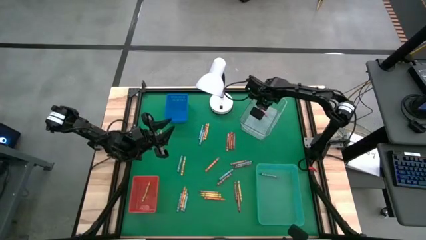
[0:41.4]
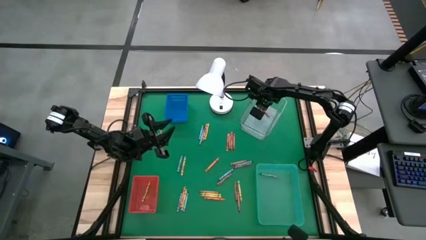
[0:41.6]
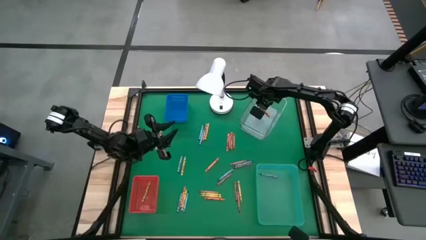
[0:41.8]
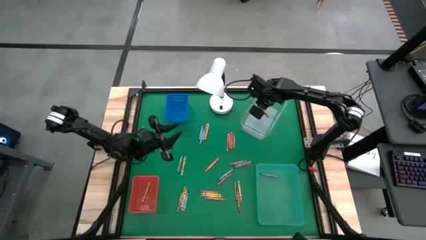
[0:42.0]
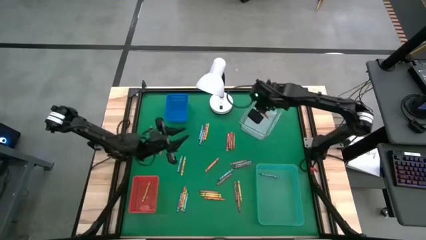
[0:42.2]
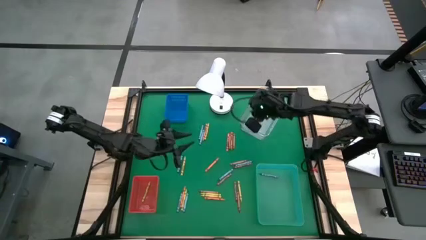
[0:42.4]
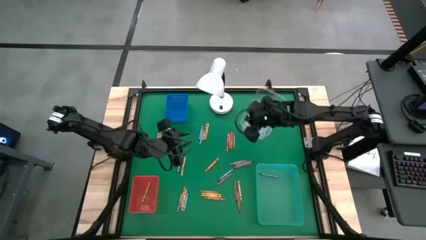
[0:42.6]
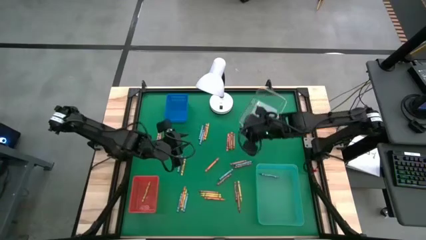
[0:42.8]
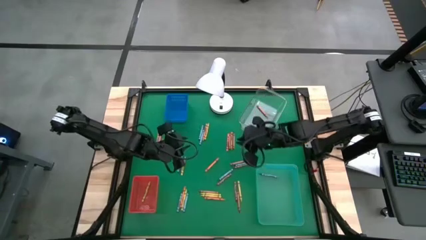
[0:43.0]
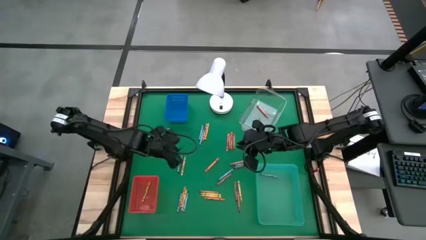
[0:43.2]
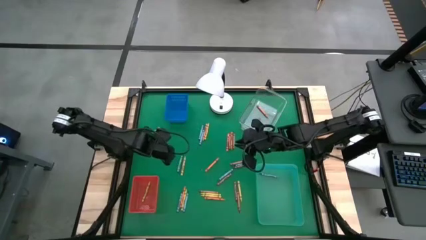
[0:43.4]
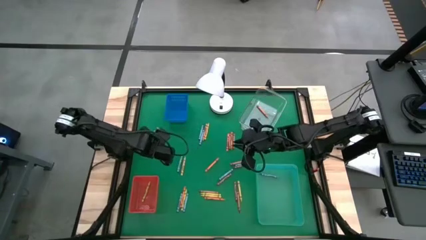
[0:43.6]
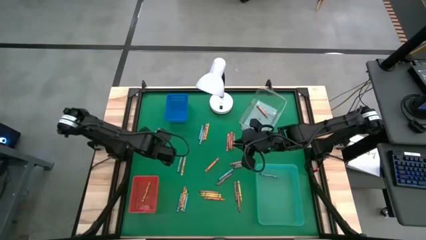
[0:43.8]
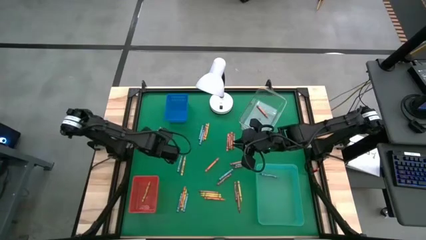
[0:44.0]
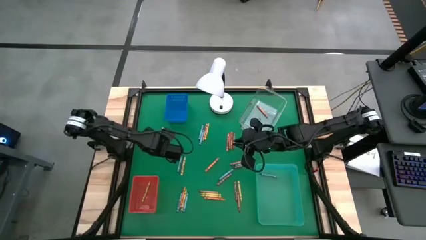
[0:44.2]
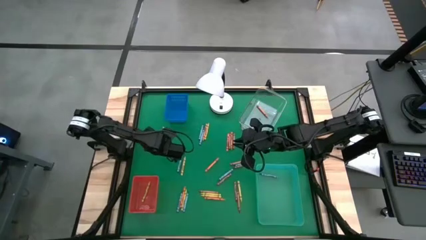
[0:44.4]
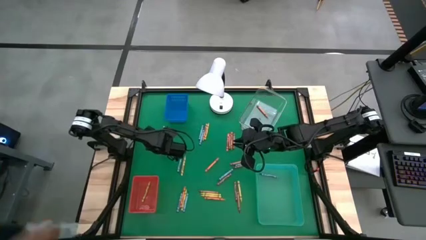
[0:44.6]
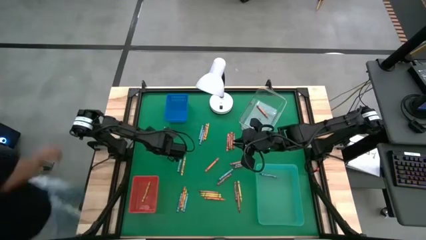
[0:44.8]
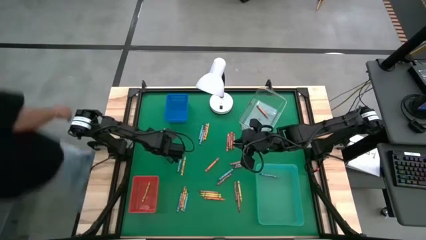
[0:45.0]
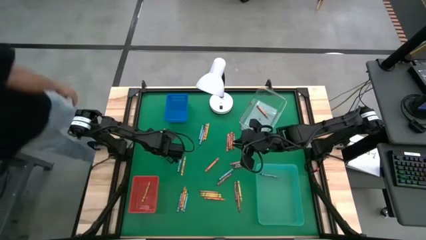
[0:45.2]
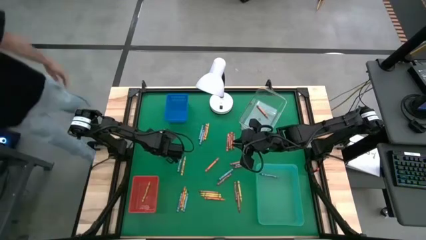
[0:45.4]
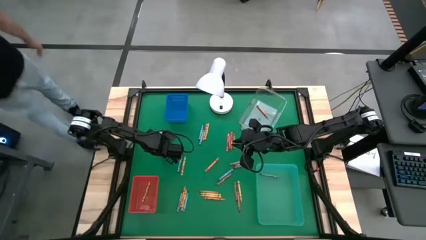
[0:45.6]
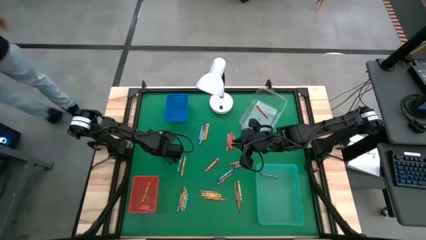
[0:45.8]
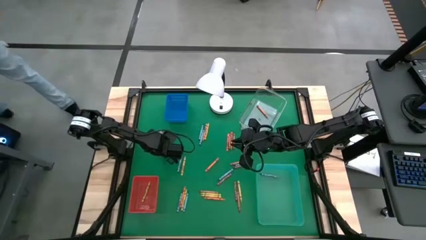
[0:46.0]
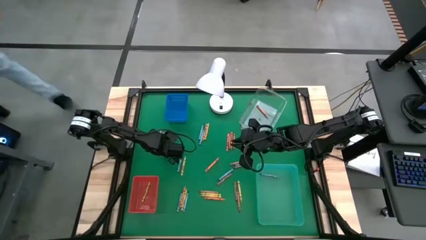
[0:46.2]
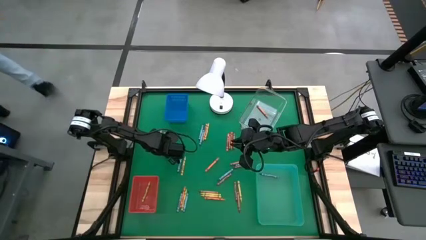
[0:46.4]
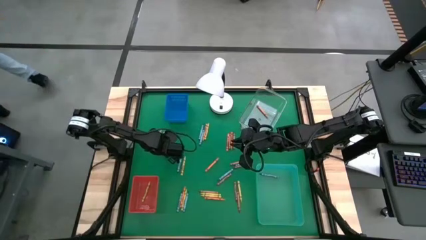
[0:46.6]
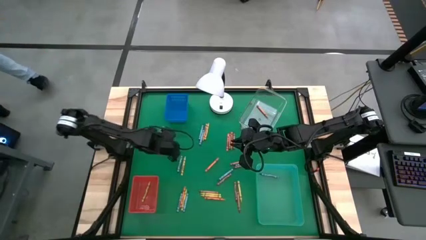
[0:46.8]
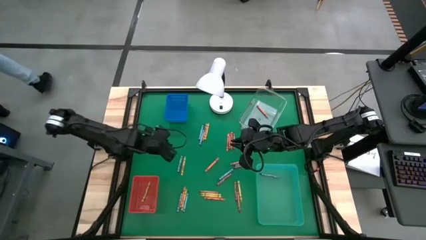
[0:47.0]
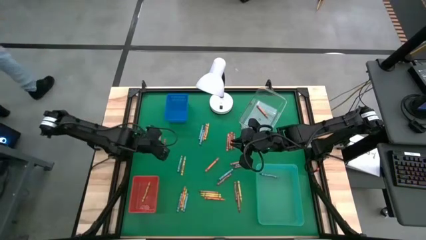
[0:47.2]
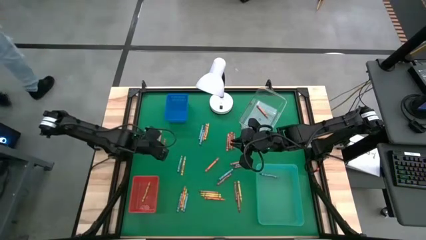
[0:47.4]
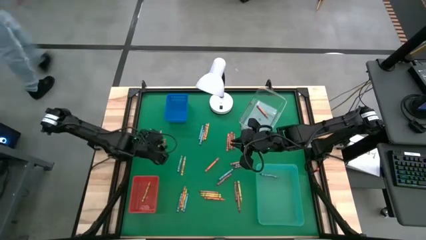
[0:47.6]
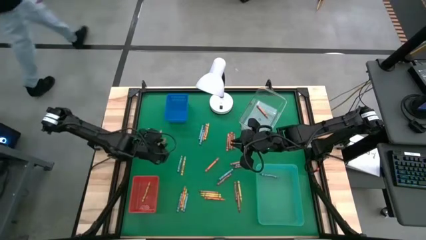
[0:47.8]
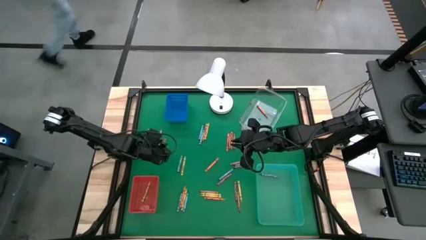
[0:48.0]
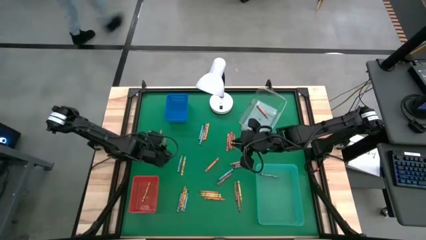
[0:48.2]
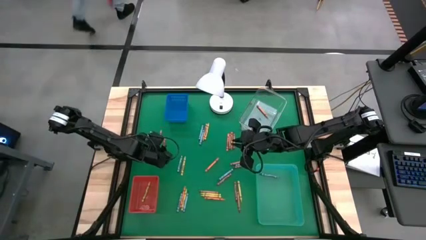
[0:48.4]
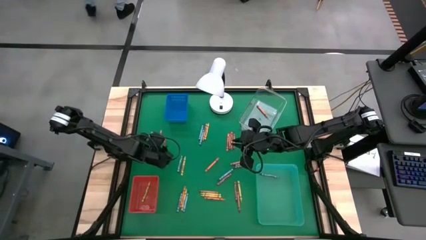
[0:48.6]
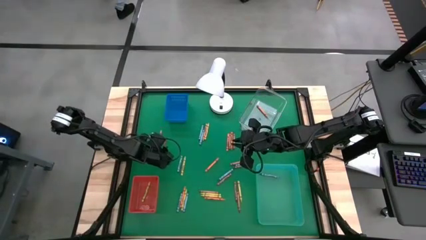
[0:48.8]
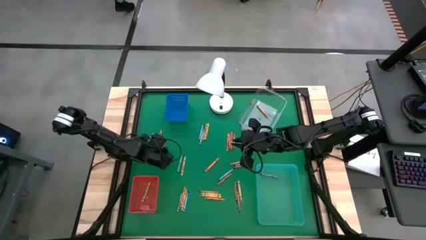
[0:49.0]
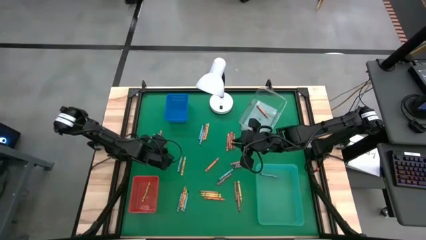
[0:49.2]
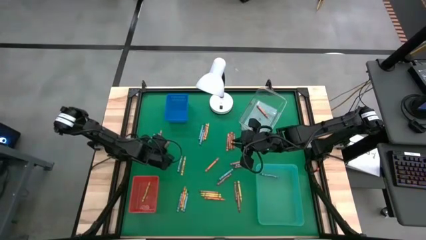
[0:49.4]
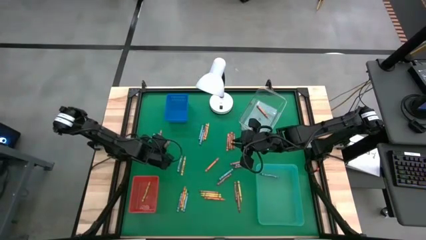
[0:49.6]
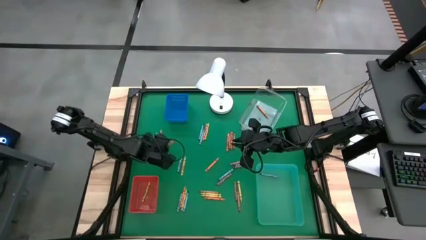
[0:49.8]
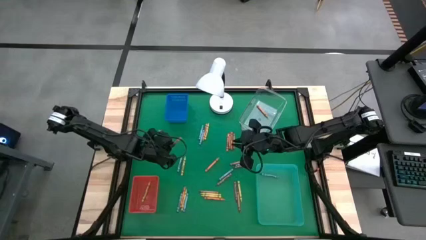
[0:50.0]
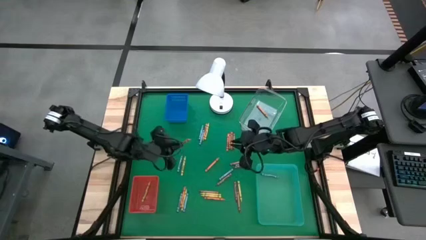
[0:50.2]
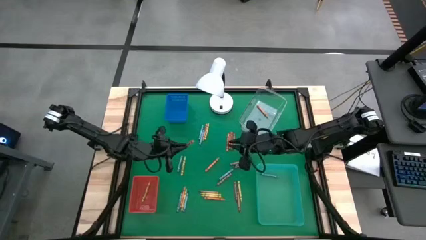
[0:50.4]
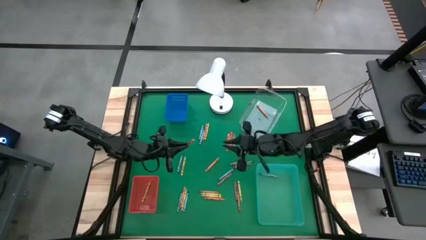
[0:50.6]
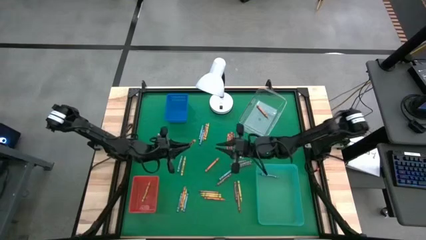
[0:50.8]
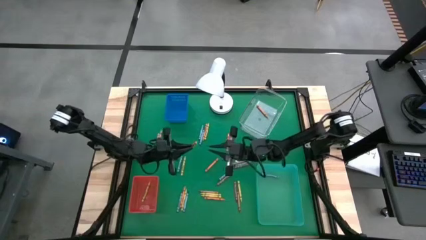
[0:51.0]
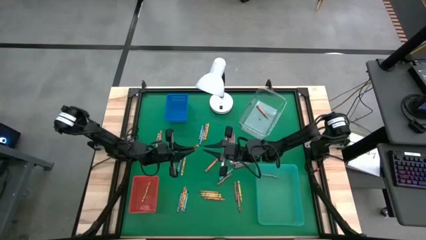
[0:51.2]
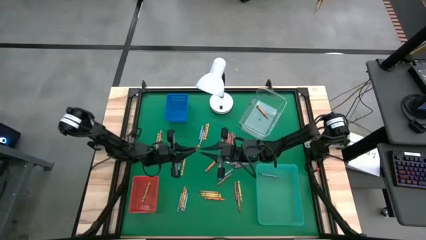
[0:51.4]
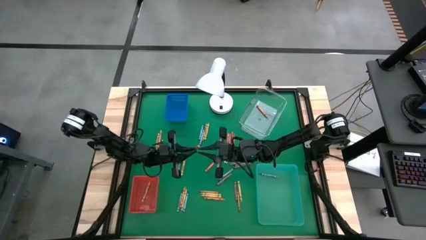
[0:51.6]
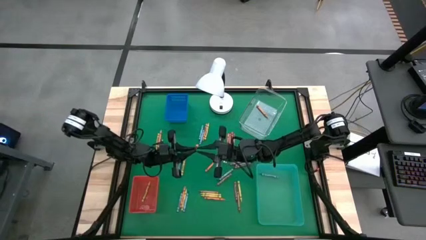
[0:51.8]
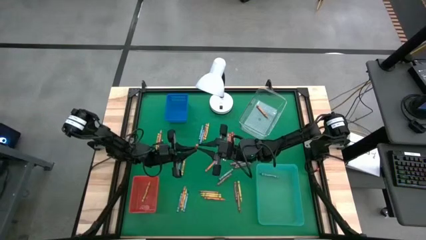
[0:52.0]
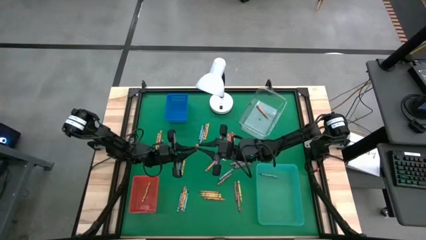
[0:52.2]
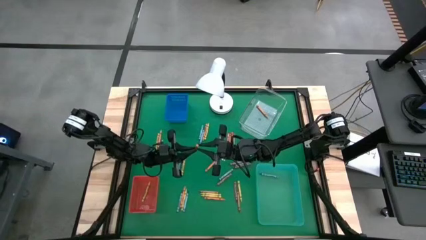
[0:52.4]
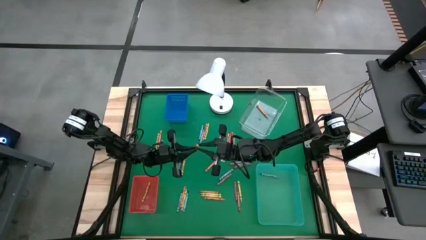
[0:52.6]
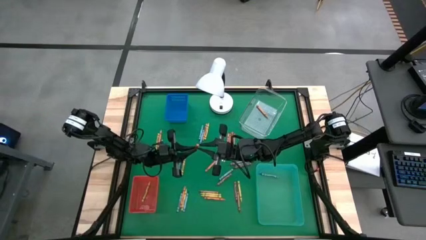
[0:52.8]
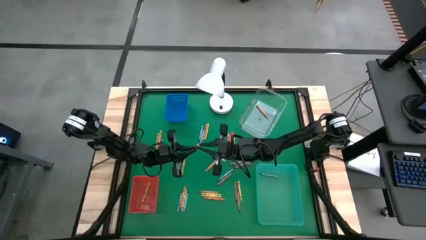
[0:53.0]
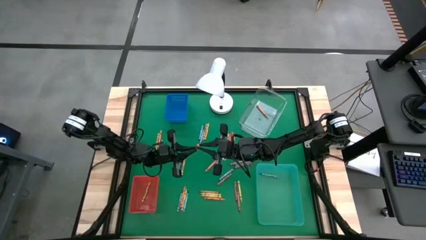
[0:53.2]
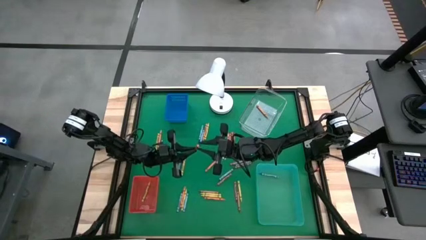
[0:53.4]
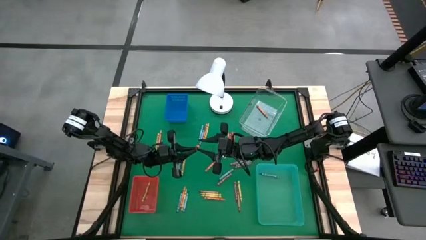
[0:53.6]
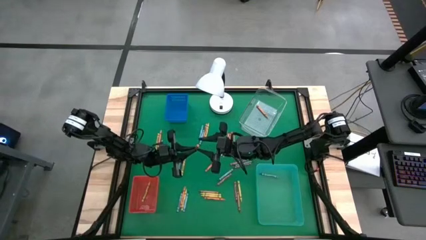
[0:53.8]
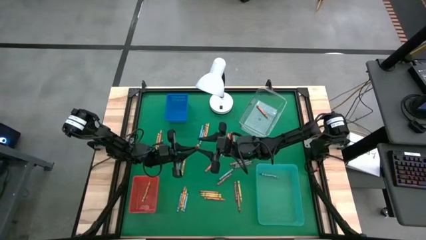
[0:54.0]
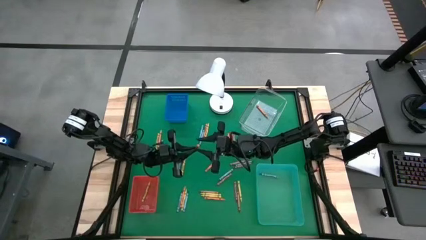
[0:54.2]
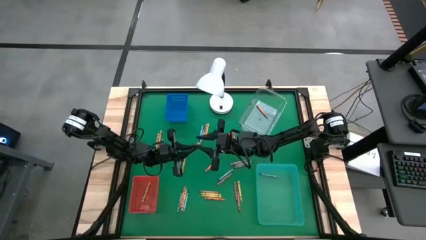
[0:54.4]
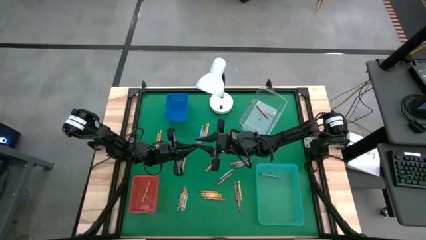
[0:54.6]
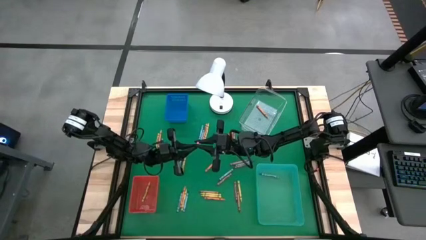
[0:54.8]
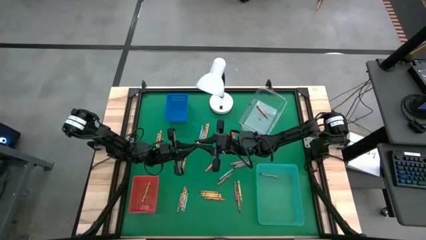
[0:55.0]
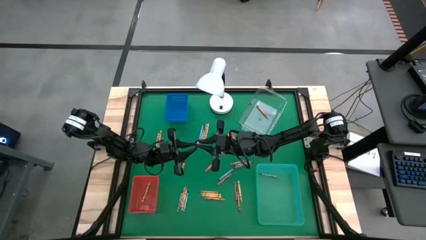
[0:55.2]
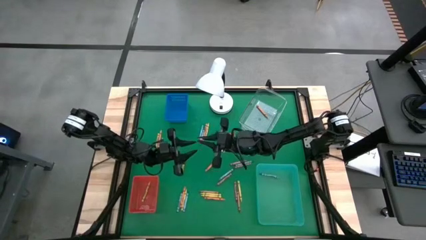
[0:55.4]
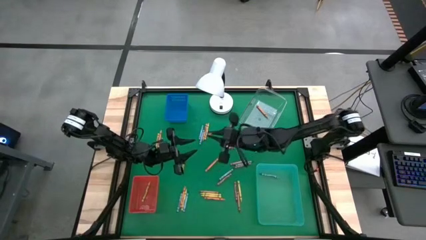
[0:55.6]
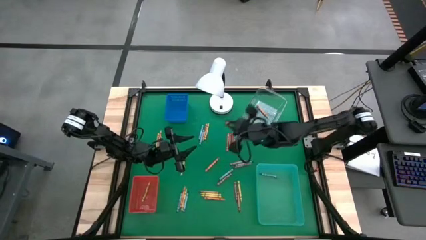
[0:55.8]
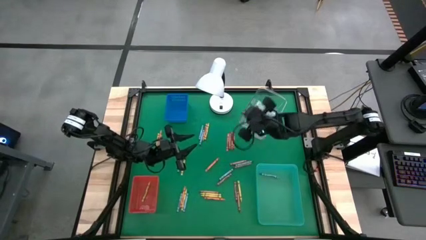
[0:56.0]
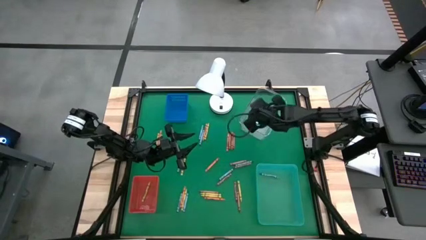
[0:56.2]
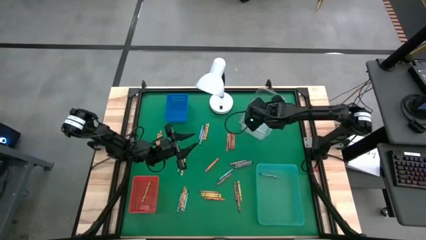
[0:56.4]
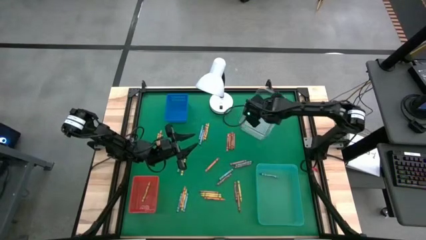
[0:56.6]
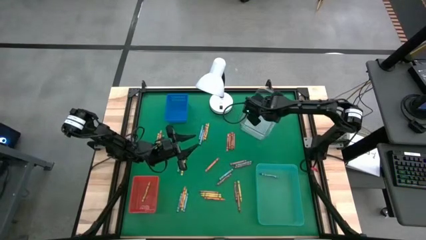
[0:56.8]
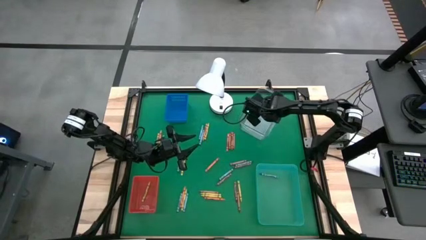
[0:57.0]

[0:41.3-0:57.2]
Task: Sort crayons
Put the orange crayon into the transparent bin
